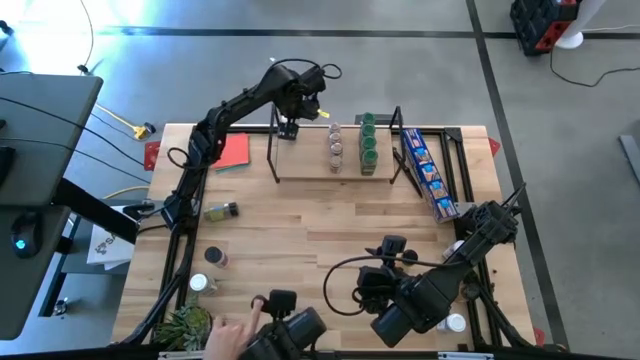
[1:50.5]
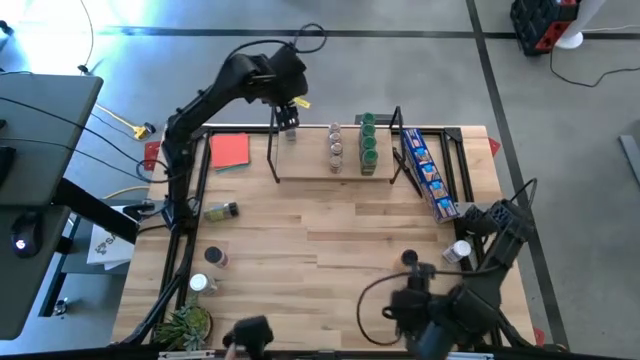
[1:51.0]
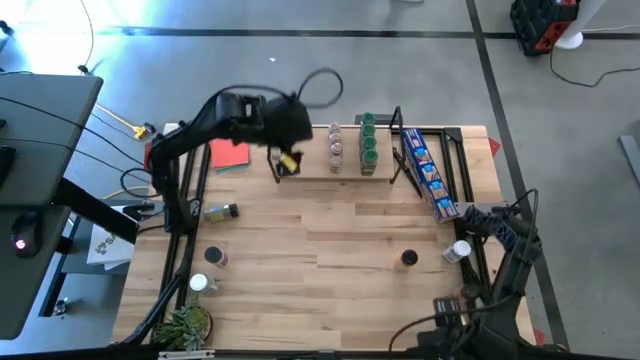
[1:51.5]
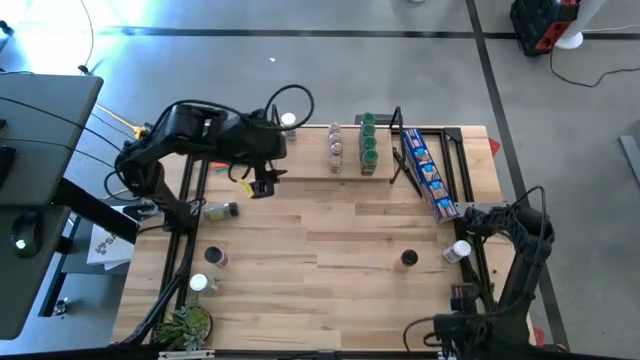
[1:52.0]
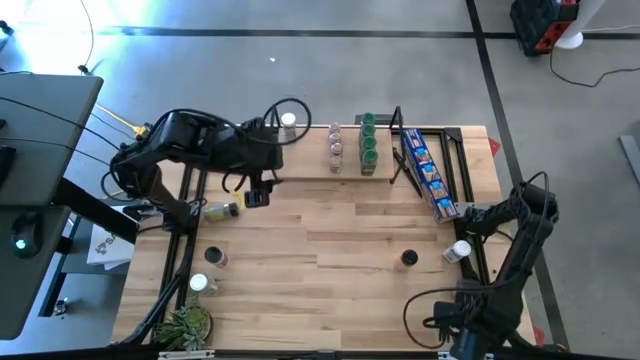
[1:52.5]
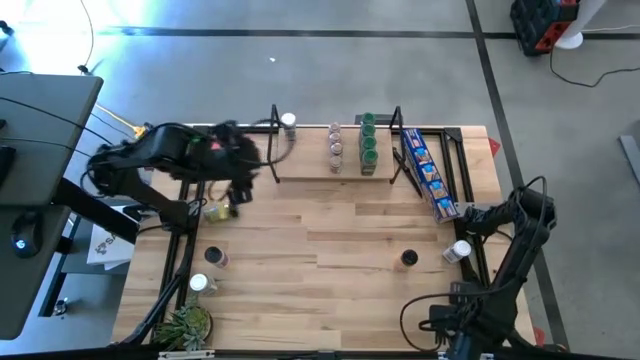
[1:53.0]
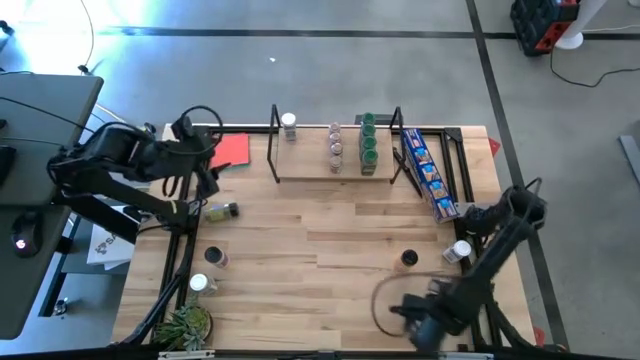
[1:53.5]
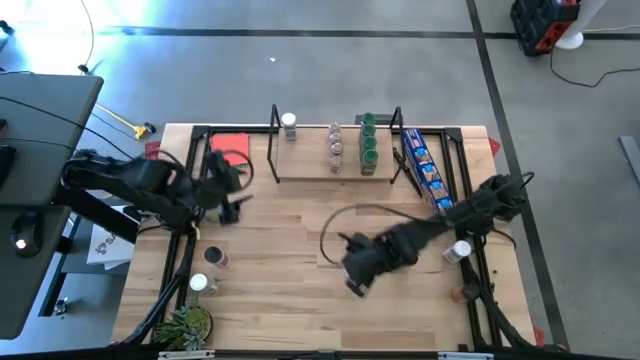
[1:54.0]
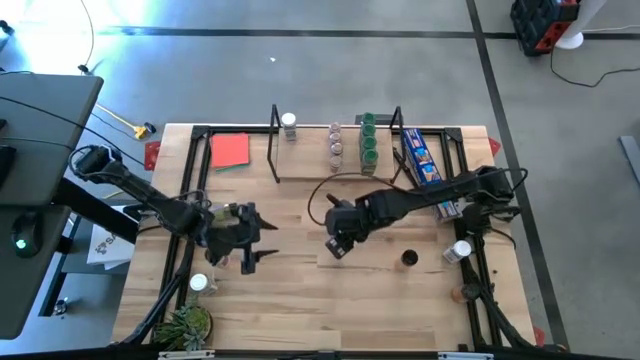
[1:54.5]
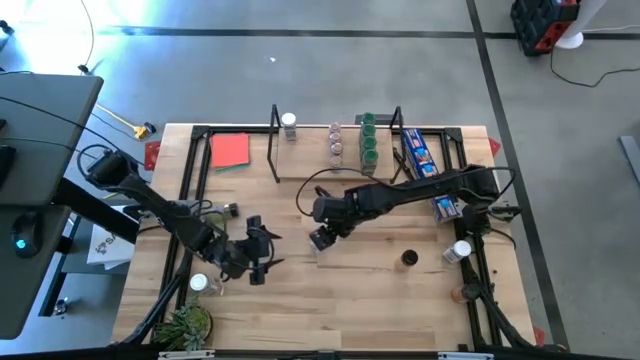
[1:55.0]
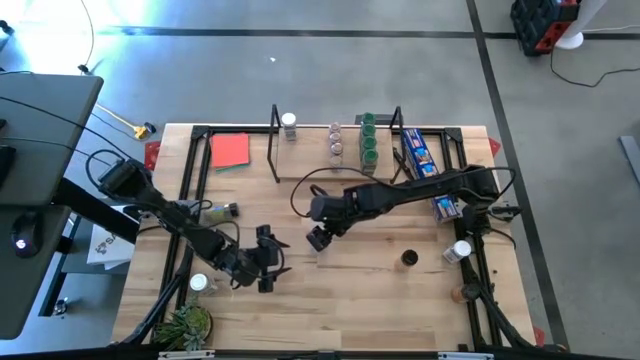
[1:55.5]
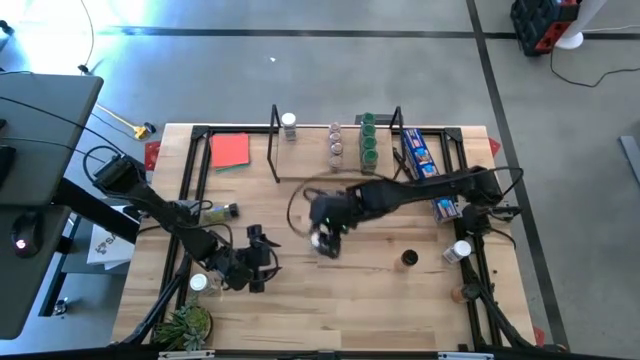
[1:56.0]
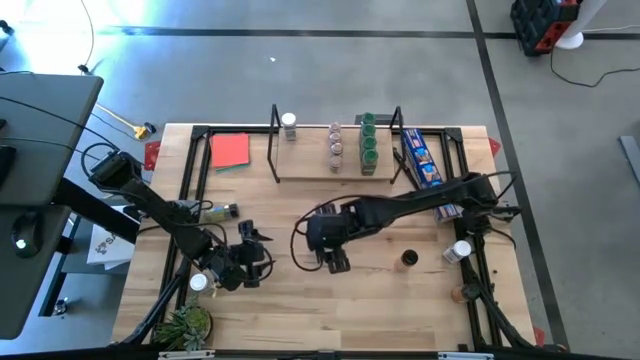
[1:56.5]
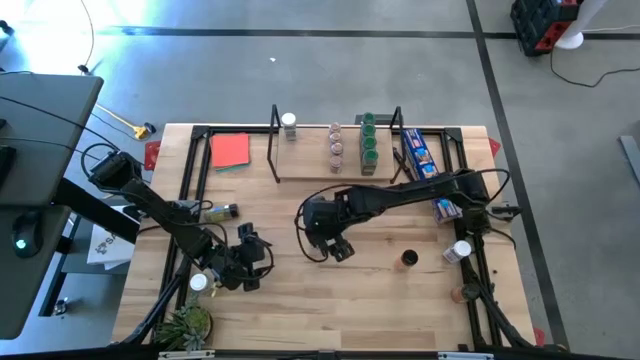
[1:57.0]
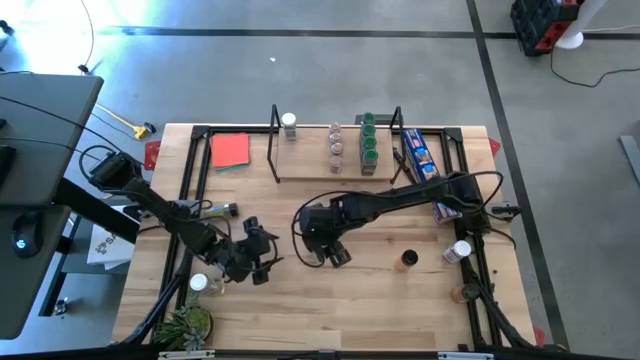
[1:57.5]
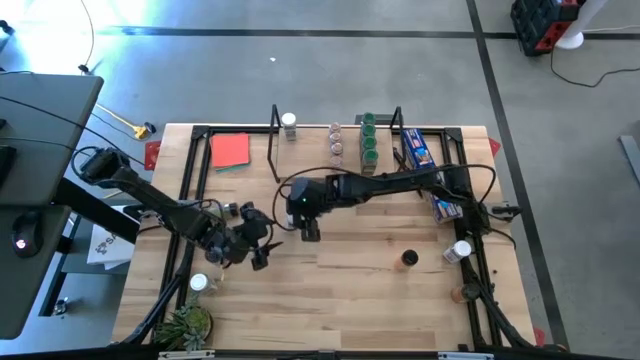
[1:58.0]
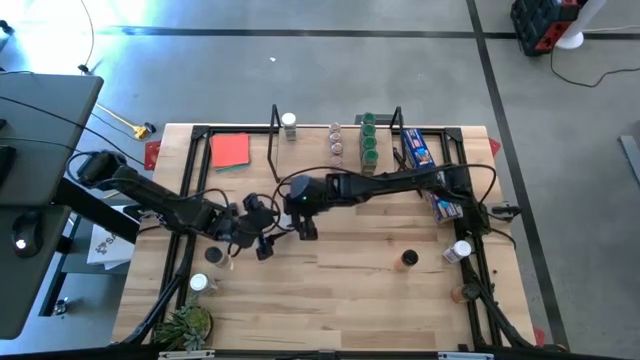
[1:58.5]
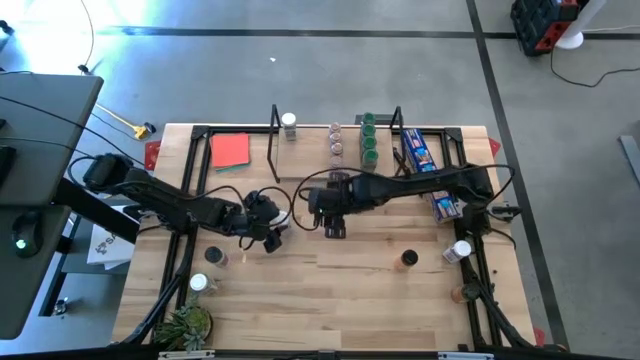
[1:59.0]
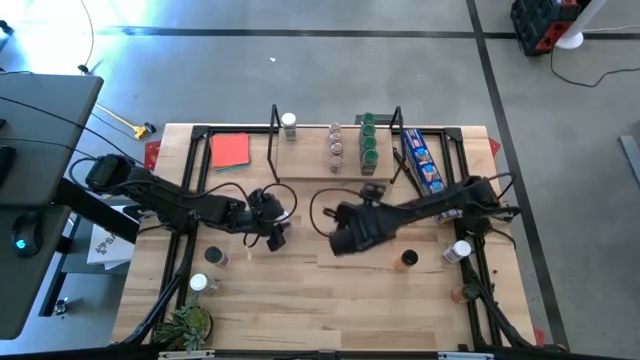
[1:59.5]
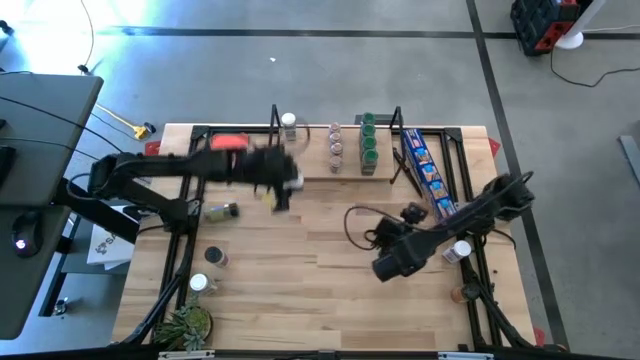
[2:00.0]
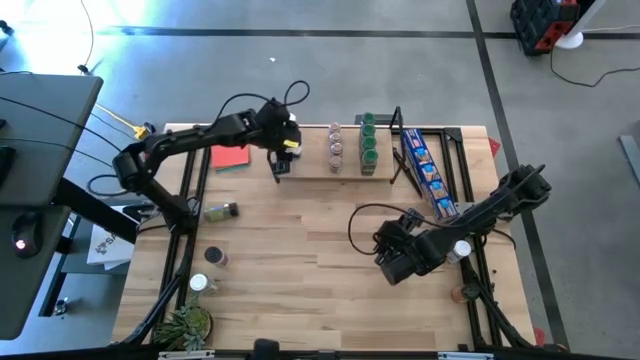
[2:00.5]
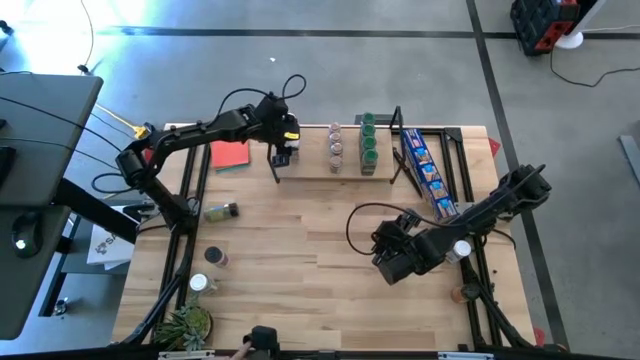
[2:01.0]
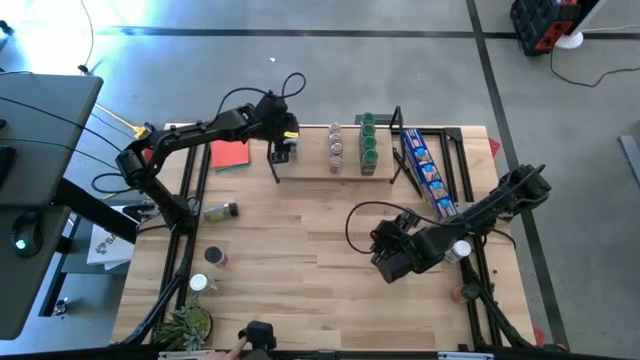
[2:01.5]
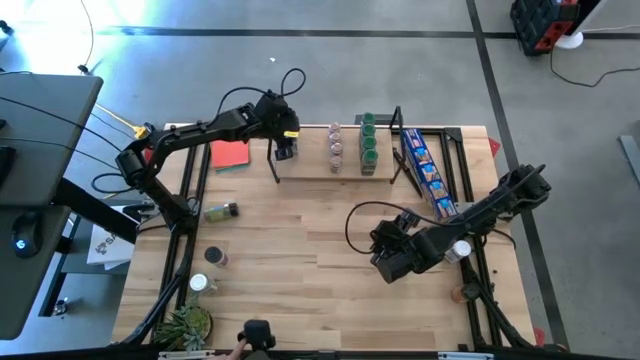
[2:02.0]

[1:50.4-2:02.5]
Task: Shelf spices
Put the white seasoning bottle on the shelf aligned with the other white seasoning bottle

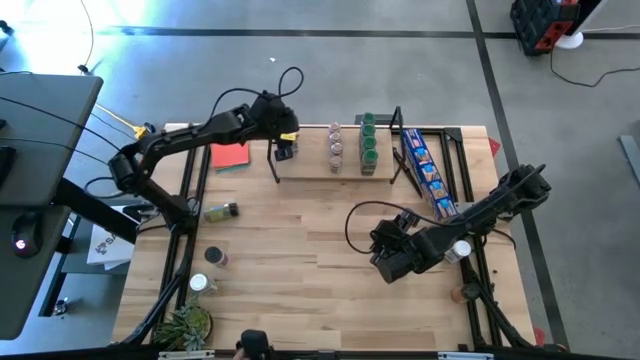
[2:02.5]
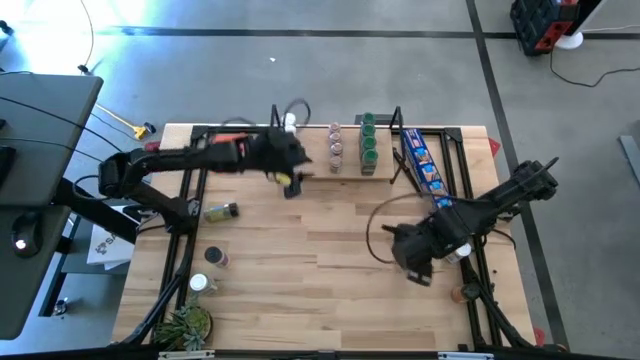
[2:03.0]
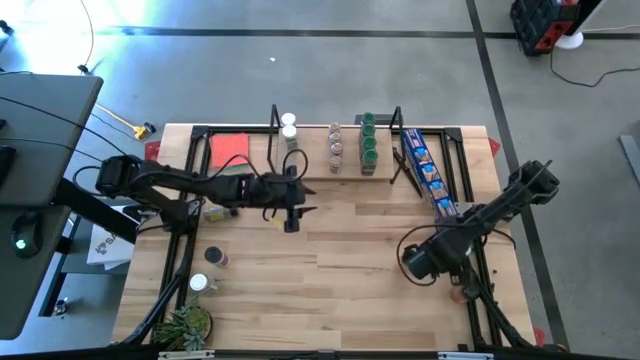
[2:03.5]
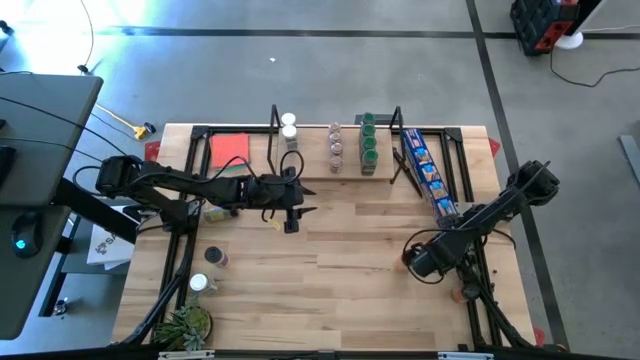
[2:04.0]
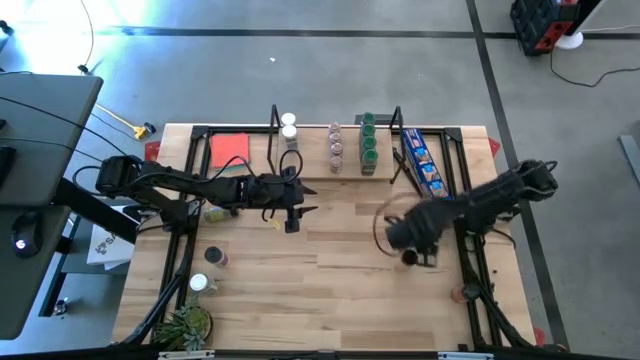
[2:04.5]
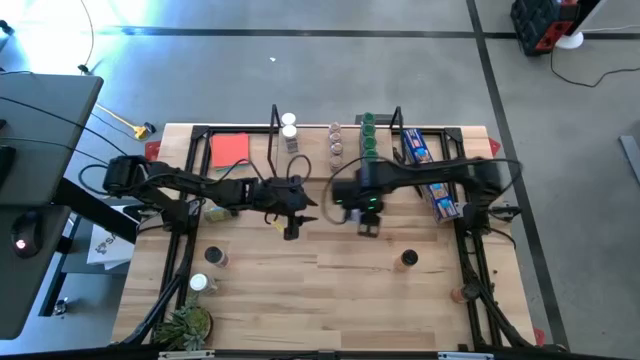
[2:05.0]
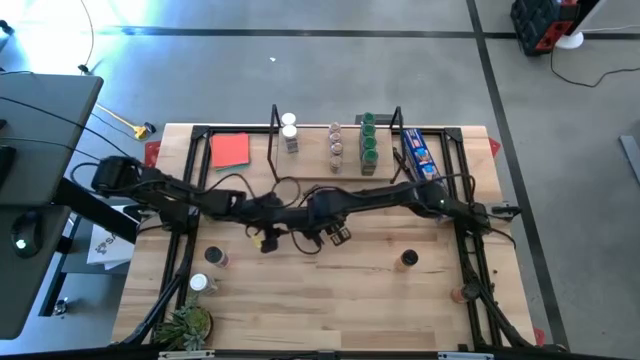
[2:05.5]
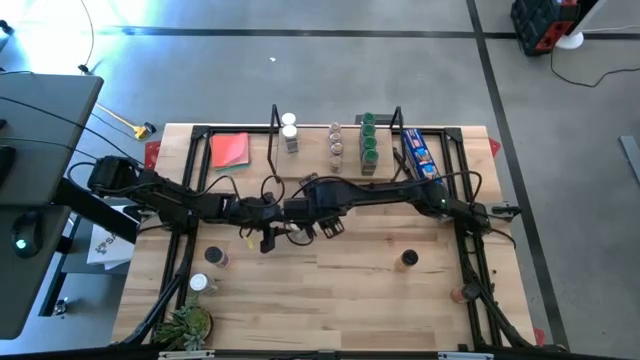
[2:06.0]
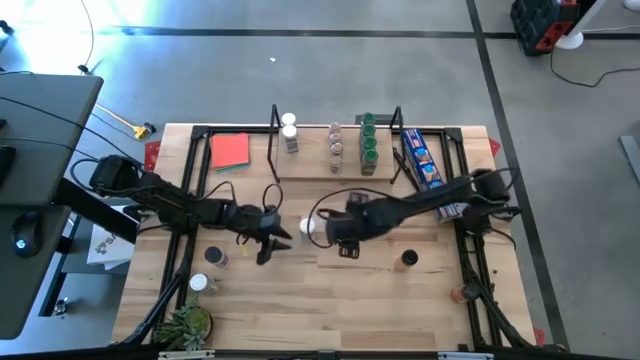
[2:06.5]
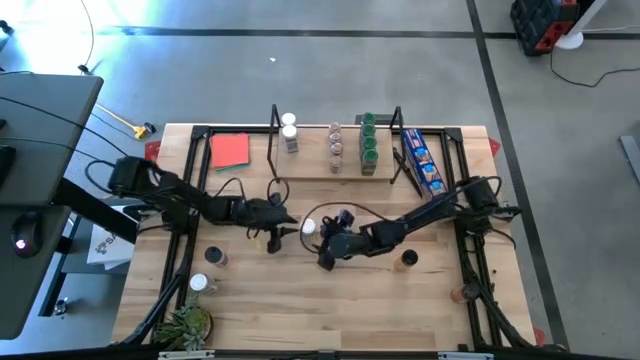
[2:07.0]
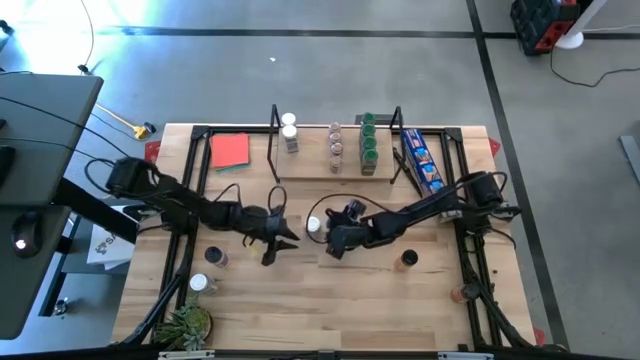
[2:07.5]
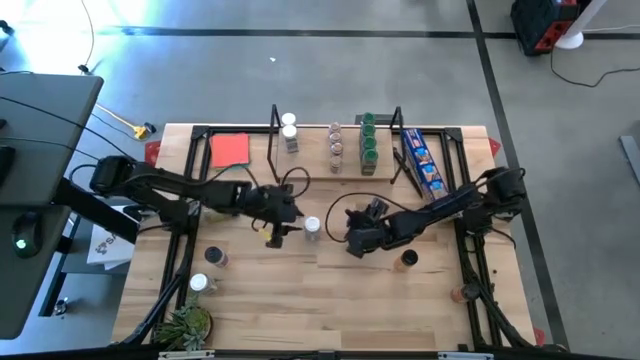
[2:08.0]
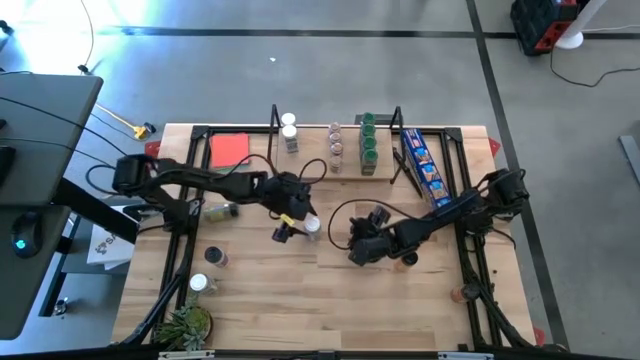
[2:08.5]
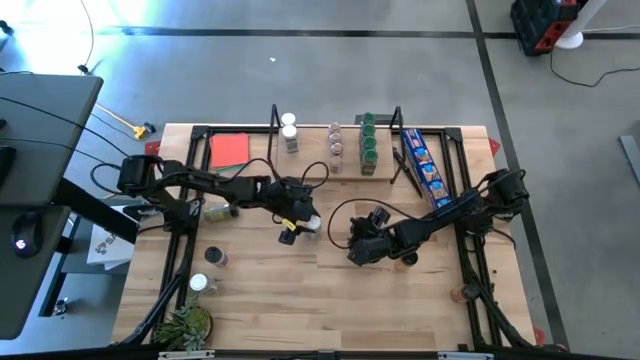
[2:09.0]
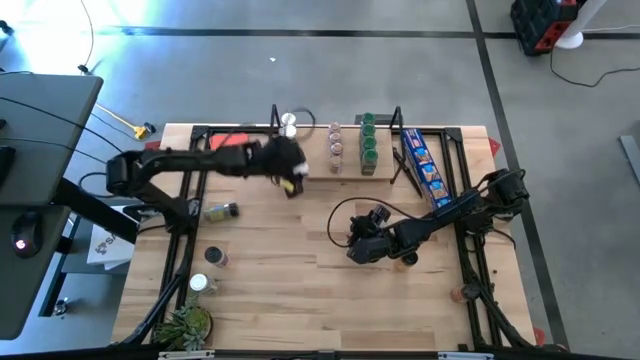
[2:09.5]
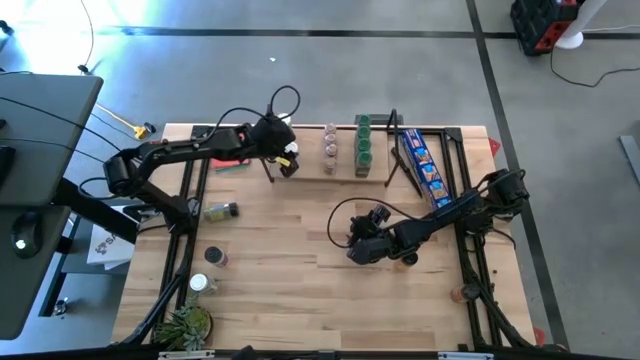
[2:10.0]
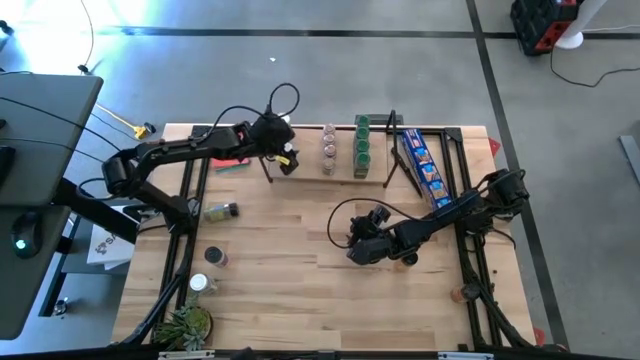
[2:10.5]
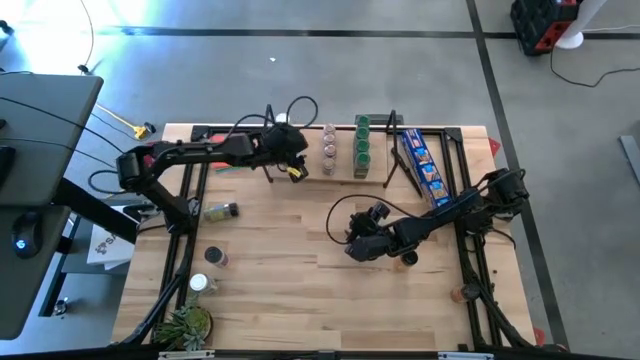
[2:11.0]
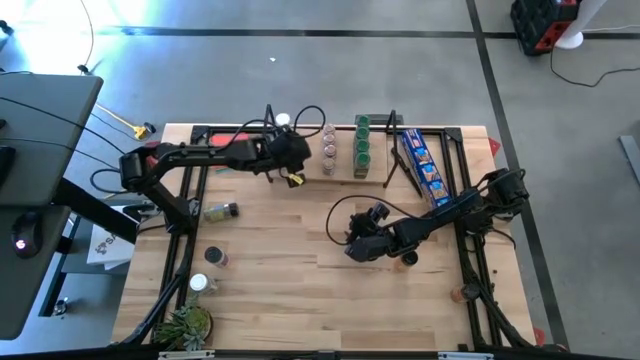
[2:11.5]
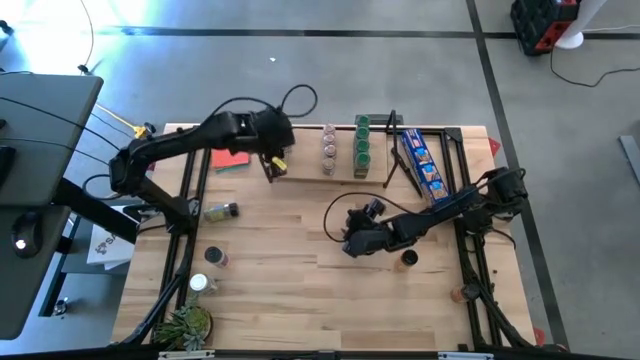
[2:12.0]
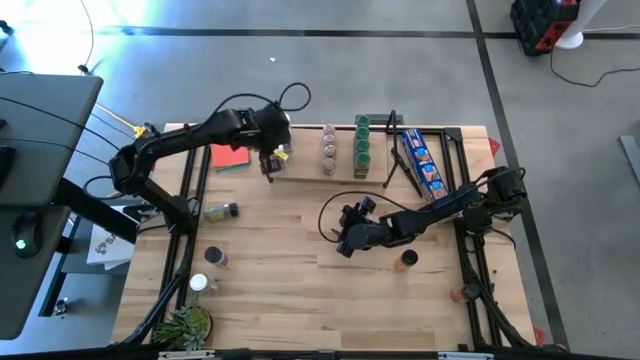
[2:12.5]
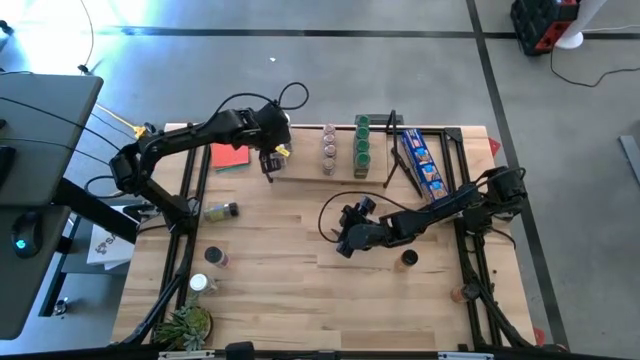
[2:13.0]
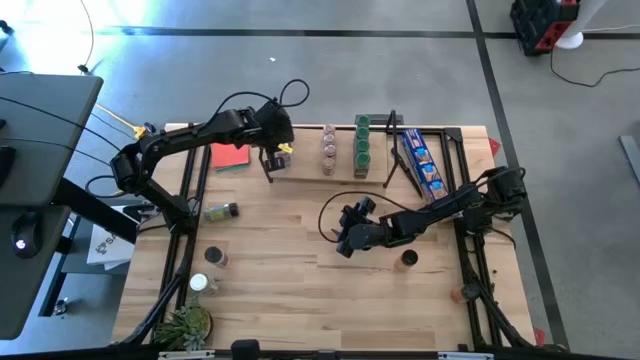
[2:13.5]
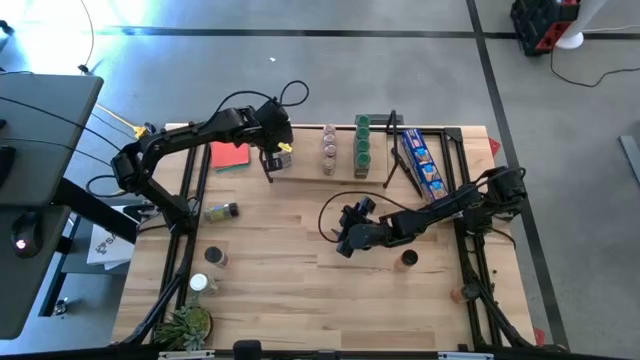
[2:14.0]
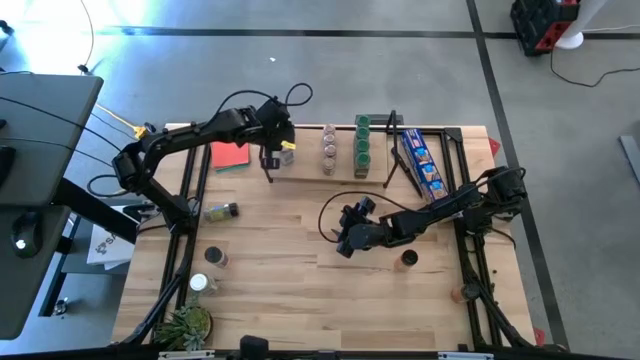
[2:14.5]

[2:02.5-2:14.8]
Put the white seasoning bottle on the shelf aligned with the other white seasoning bottle
